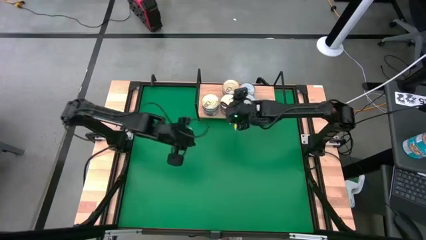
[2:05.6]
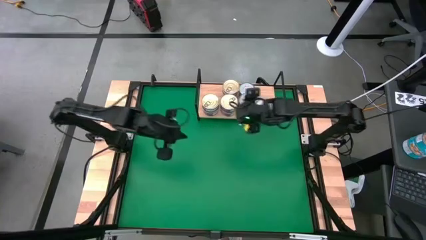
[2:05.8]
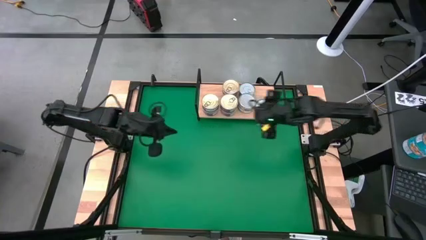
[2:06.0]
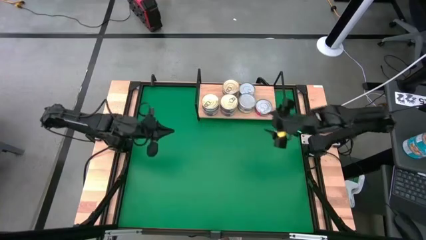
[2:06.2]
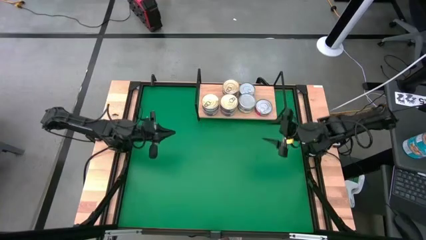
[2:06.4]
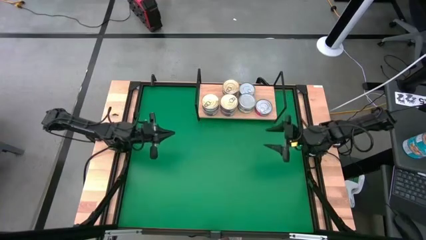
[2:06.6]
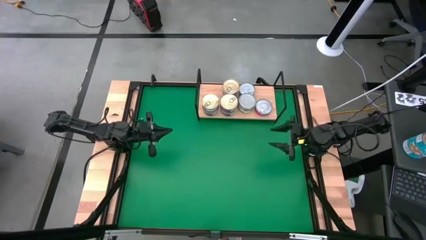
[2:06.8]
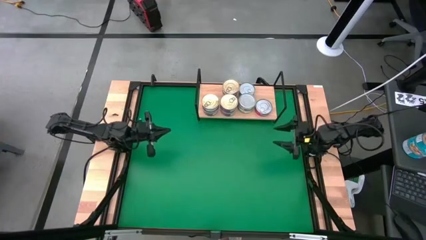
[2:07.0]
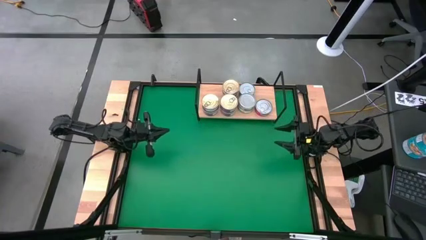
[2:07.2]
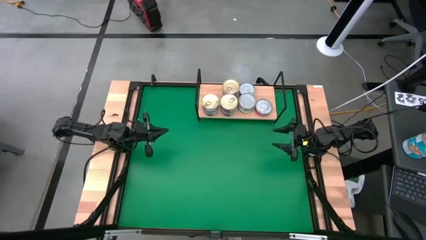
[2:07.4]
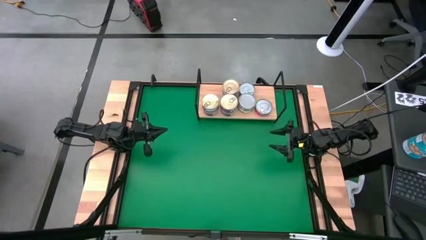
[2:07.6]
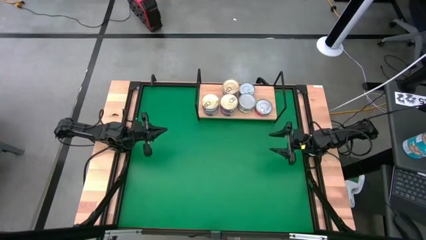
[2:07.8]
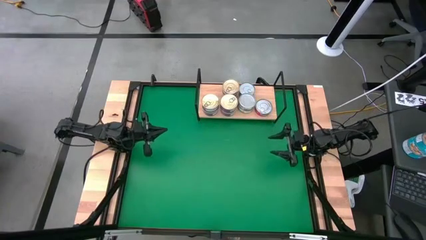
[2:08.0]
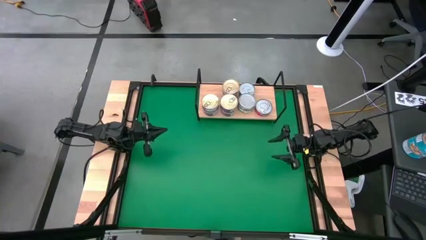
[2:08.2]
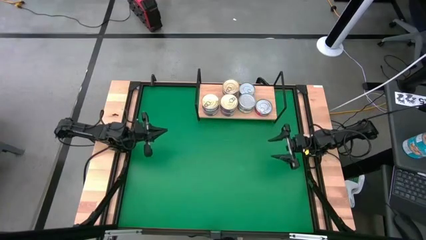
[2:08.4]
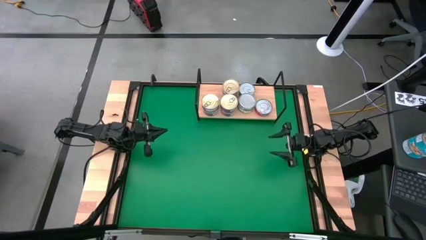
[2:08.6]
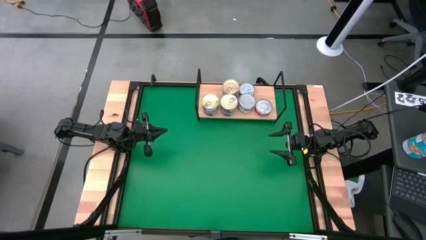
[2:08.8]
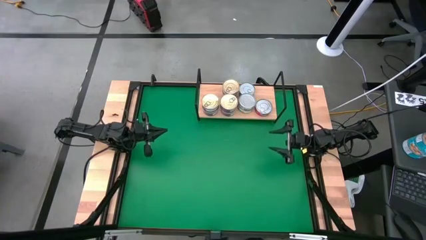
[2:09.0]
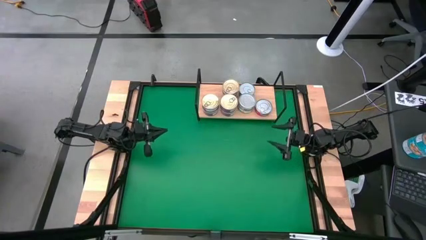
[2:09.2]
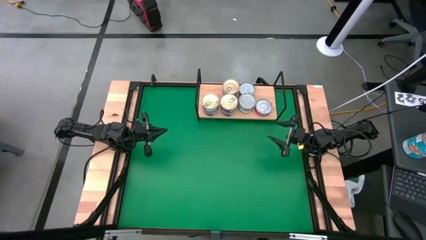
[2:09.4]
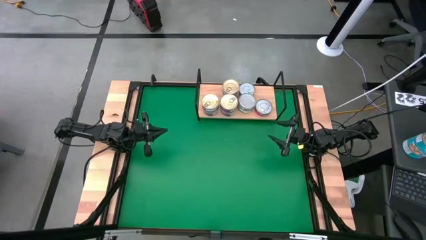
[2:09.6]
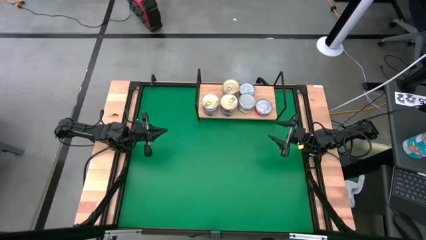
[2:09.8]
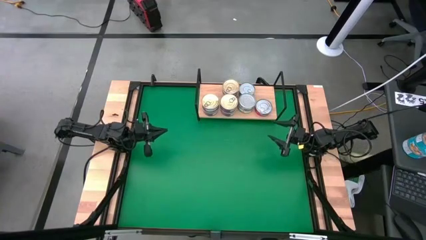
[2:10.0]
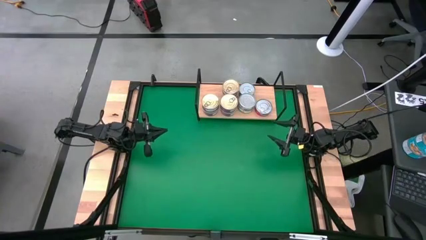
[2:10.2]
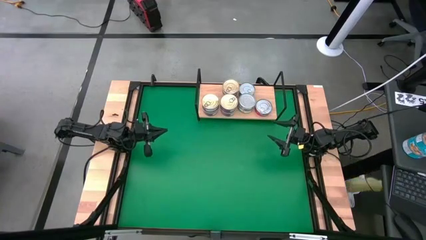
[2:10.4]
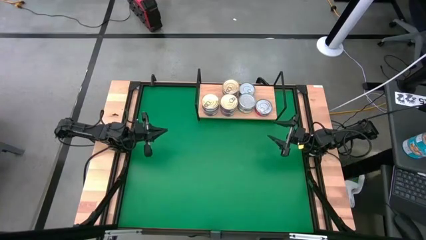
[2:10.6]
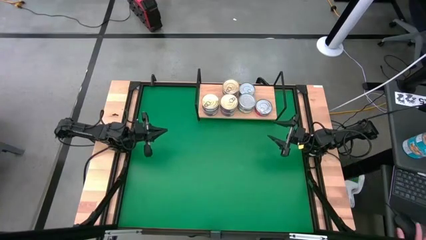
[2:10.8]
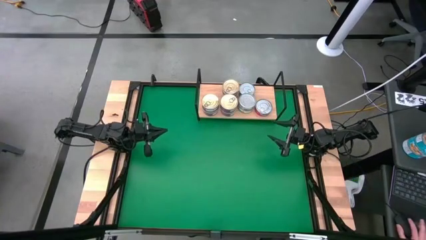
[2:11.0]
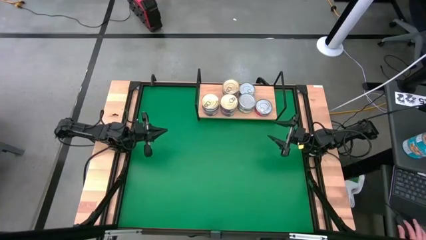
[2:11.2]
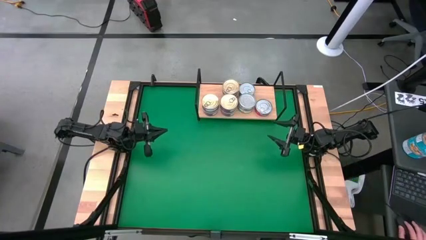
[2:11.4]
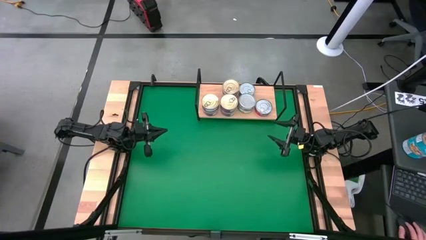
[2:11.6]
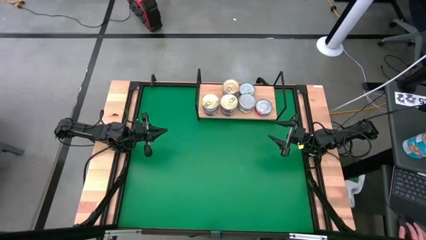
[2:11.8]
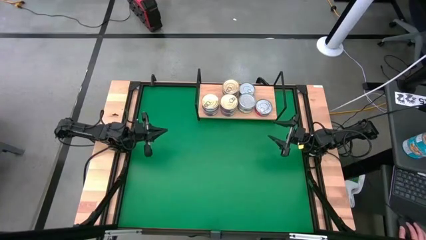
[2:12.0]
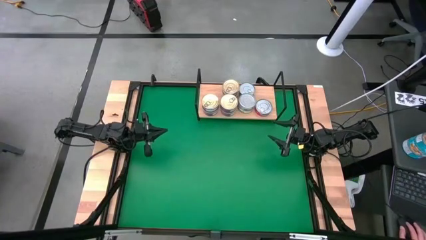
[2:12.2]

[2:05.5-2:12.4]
Task: Stack canned seafood by type on shelf
Return to Home Position

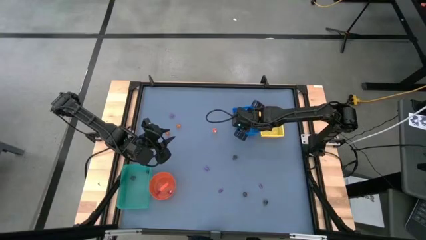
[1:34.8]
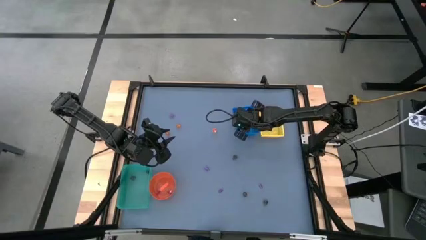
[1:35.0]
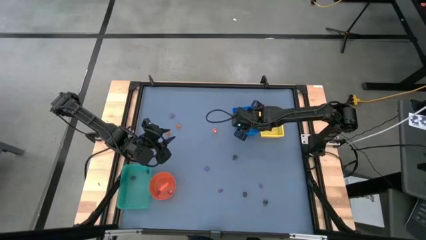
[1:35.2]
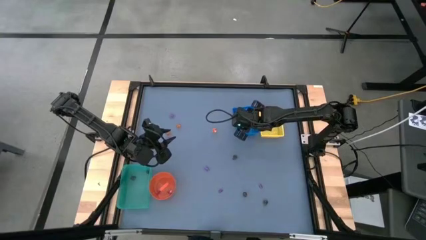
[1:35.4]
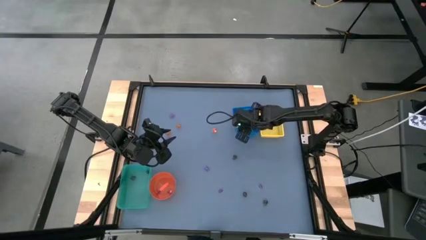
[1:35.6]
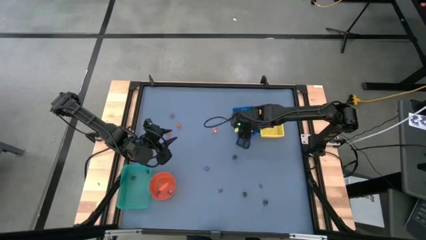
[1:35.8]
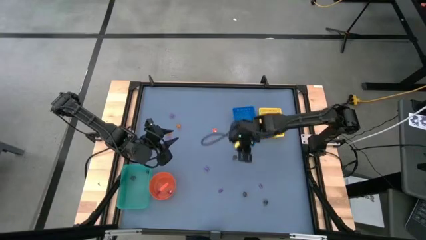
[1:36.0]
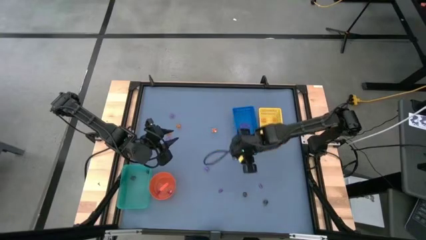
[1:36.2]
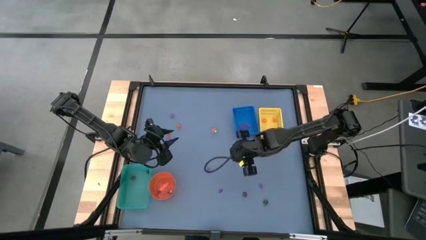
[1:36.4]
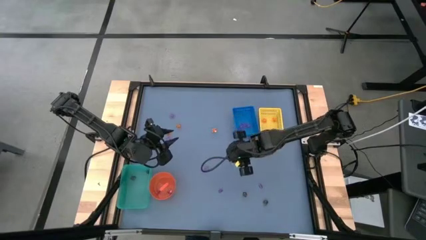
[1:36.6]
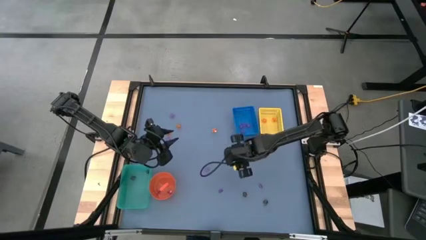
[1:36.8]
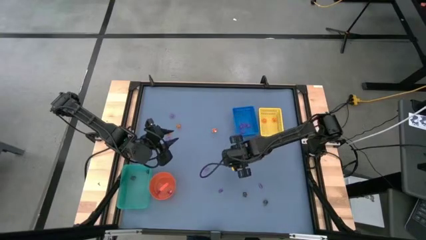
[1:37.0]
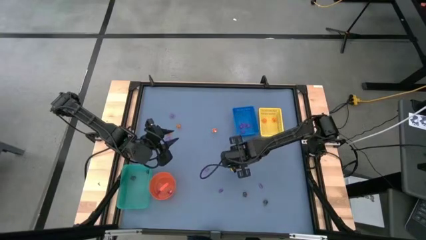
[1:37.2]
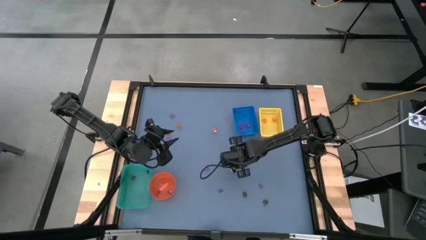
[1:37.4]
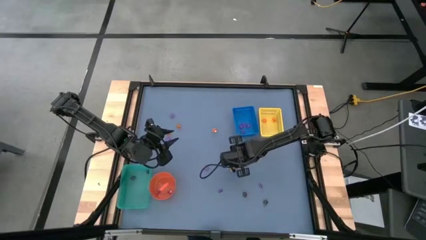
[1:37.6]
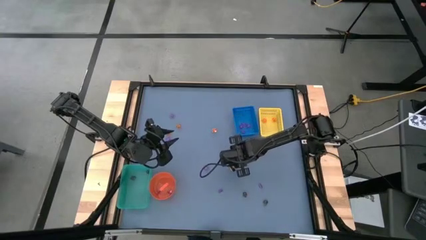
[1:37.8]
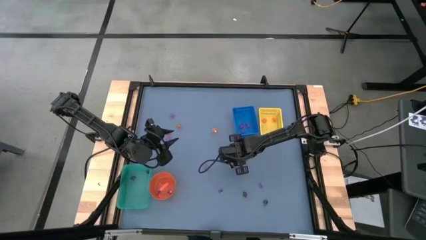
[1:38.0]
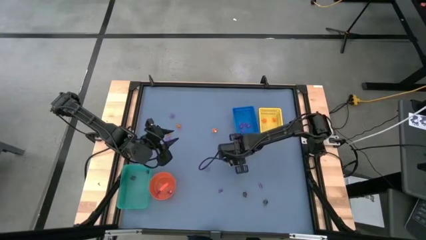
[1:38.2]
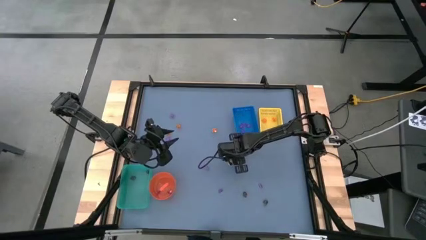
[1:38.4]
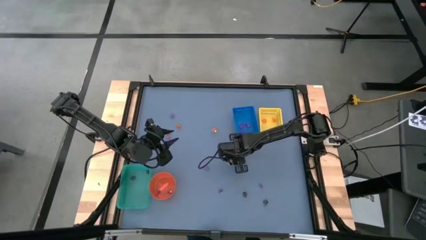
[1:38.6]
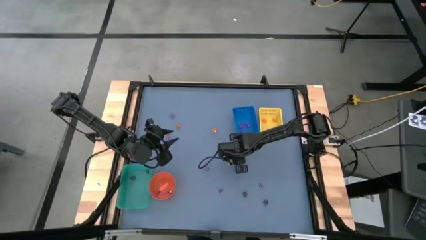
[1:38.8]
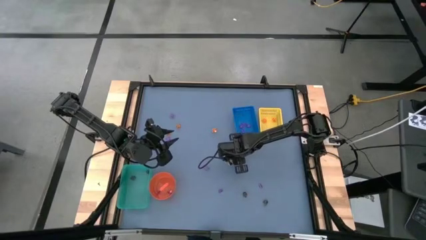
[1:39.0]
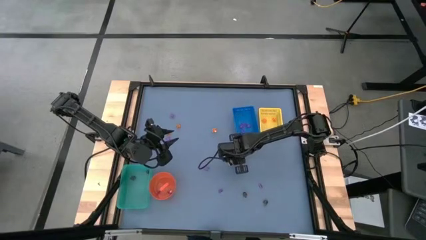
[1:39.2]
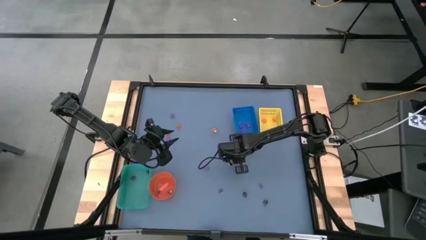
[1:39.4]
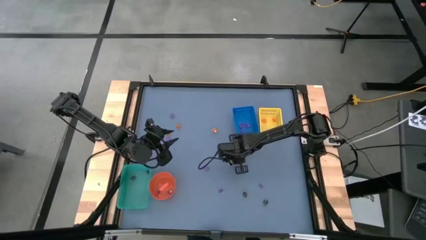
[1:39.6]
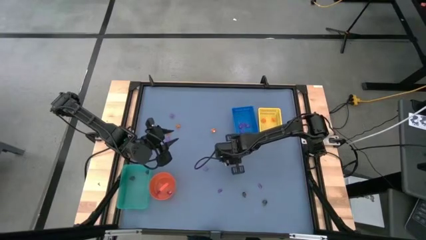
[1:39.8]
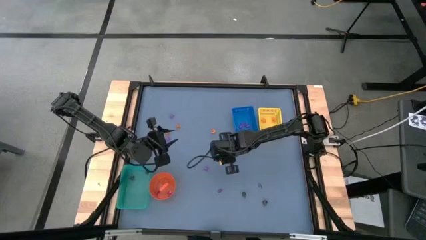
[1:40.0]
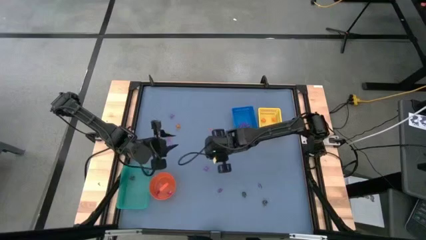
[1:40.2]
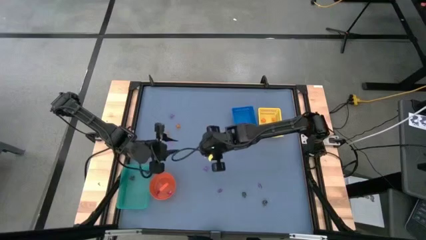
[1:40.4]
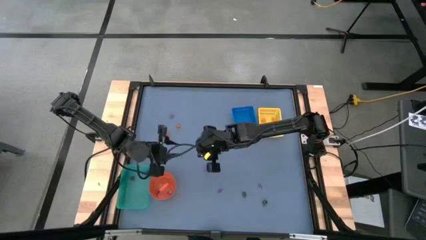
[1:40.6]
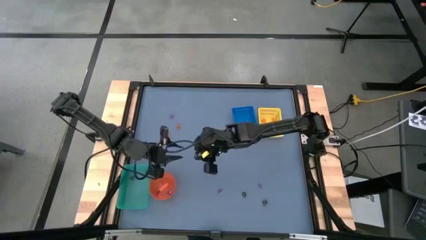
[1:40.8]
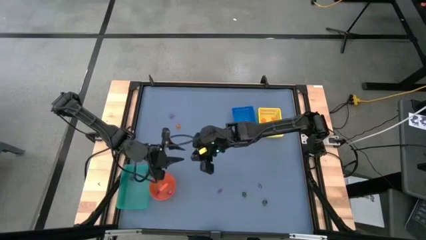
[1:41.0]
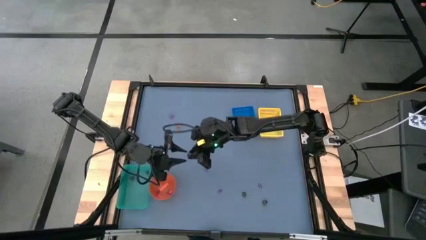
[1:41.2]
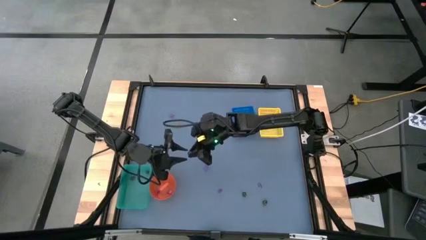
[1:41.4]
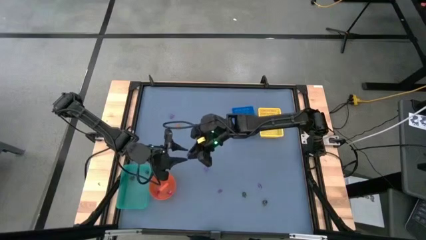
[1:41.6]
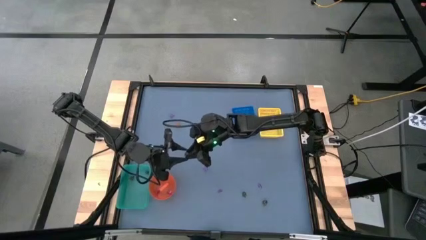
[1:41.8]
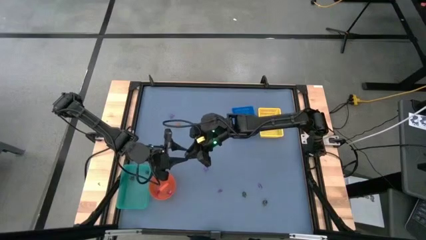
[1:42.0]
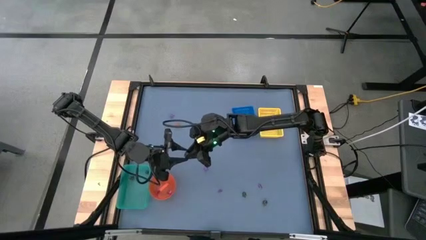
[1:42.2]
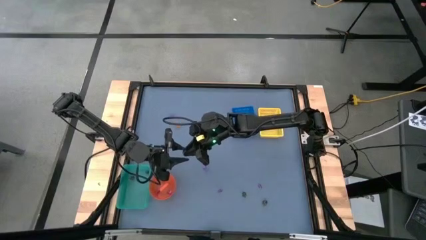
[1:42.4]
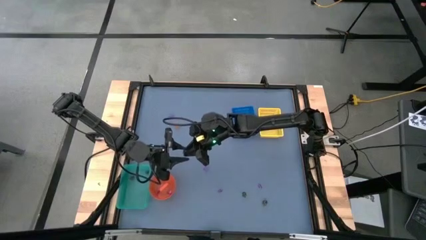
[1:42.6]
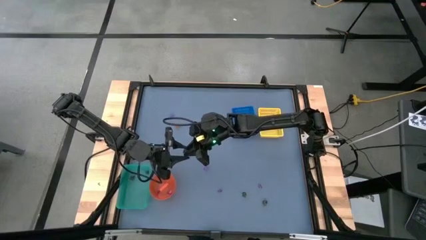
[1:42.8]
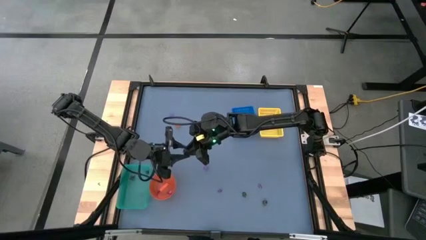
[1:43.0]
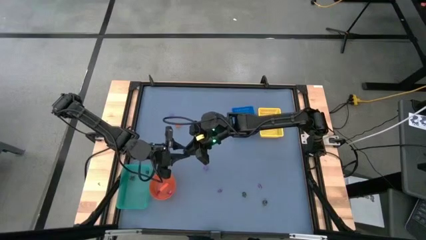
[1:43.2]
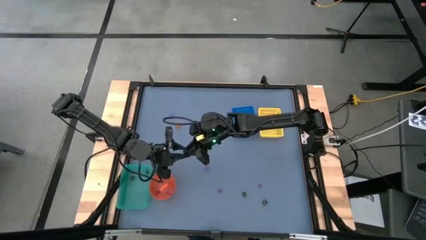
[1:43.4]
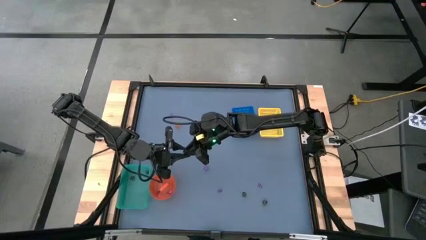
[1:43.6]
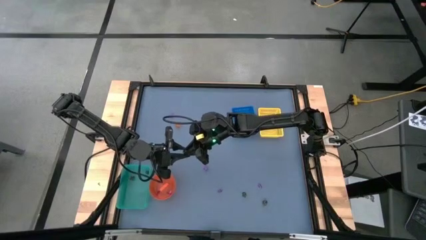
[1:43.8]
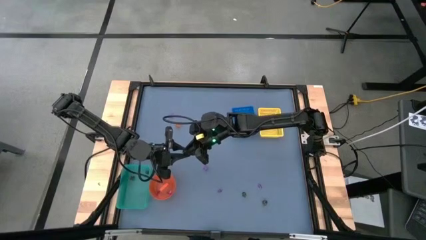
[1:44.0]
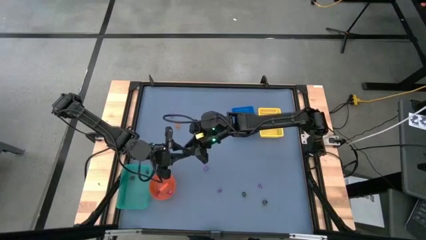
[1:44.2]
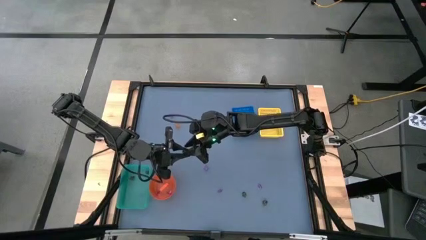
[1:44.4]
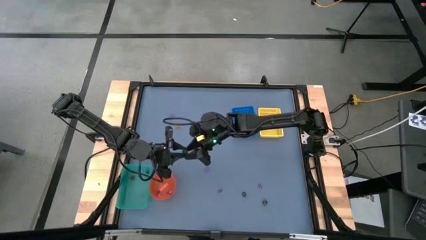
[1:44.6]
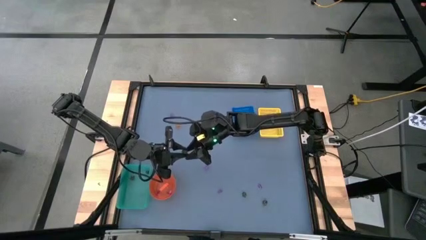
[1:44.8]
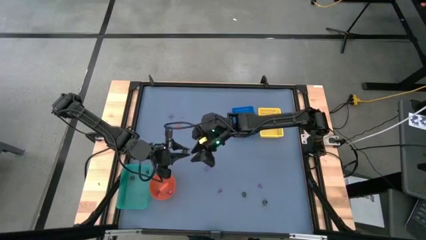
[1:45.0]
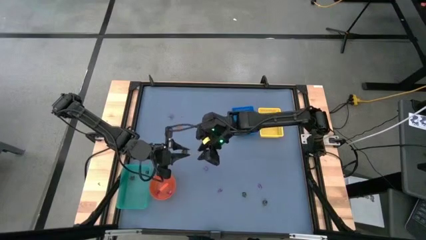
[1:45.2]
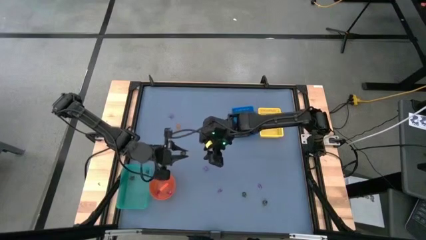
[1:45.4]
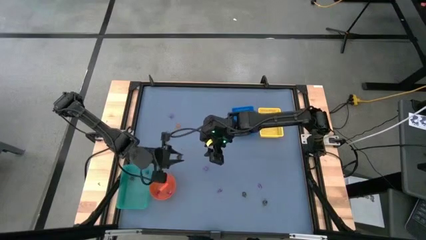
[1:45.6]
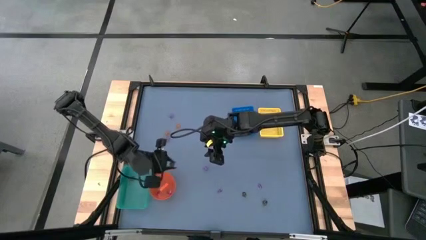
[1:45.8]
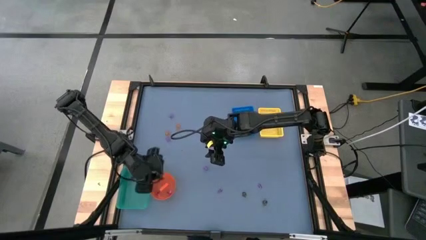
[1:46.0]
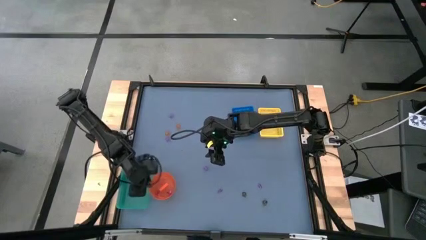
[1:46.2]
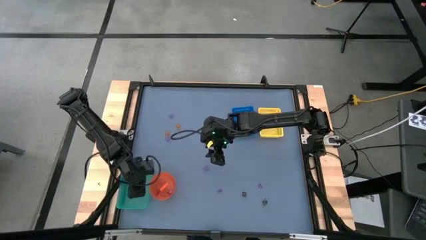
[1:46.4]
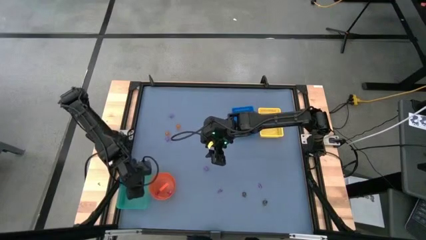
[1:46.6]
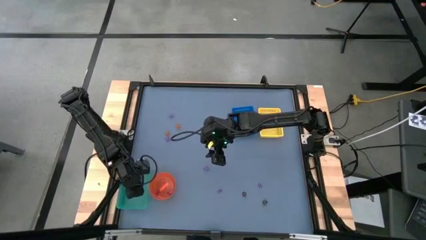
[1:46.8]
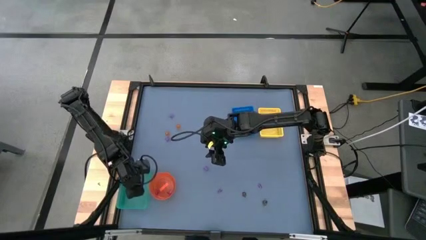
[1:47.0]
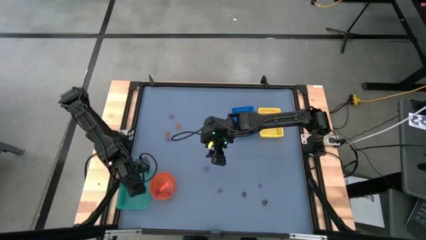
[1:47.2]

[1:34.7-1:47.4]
Task: Sort Halloween decoration
Put the brown skull toy into the green bin
